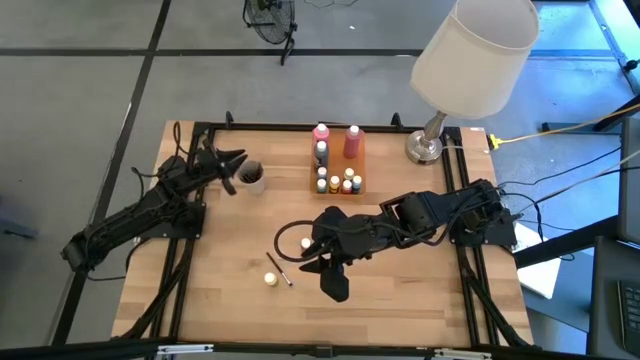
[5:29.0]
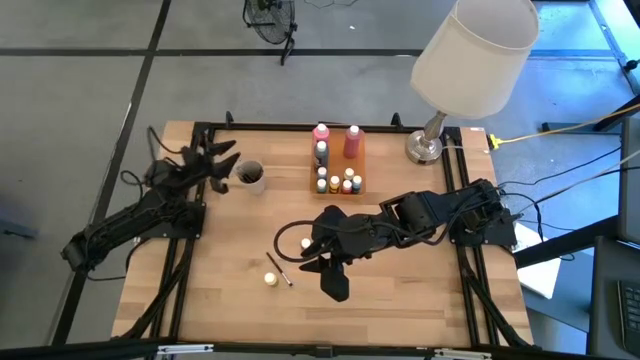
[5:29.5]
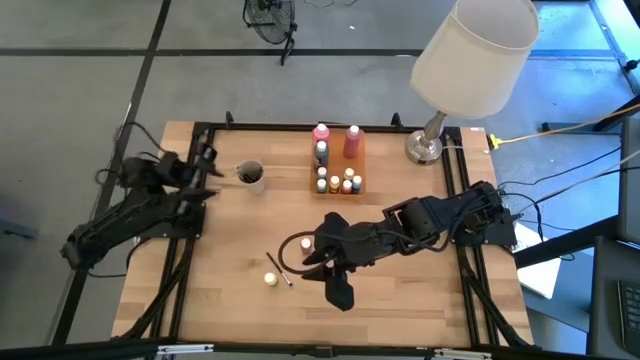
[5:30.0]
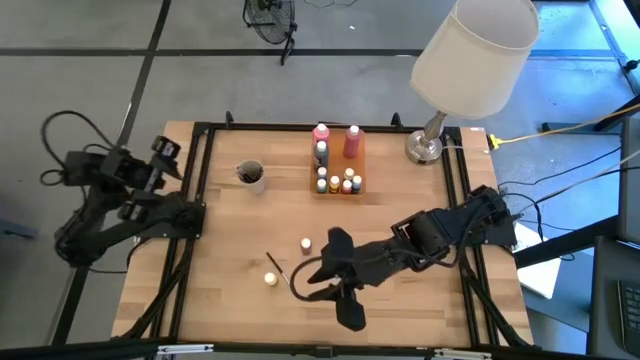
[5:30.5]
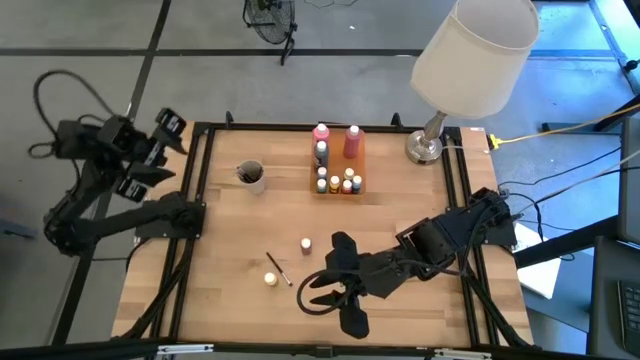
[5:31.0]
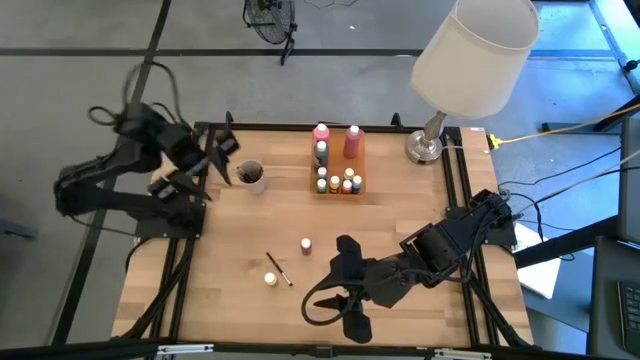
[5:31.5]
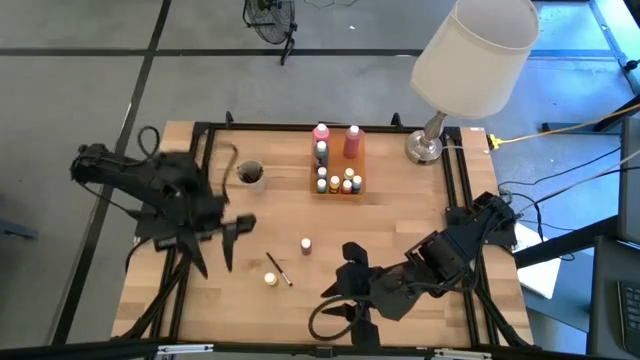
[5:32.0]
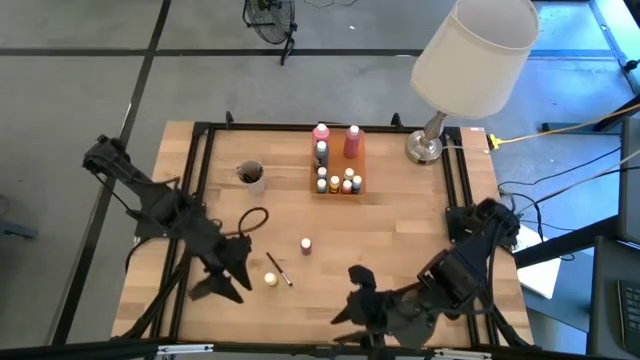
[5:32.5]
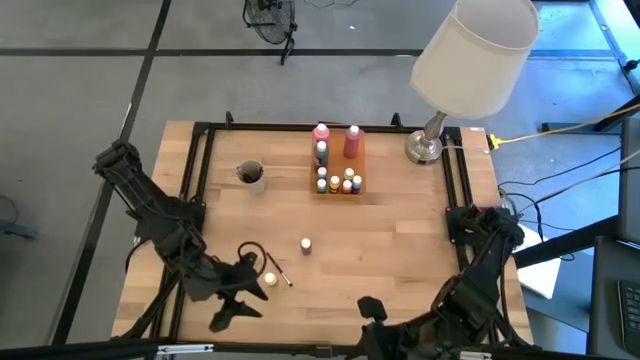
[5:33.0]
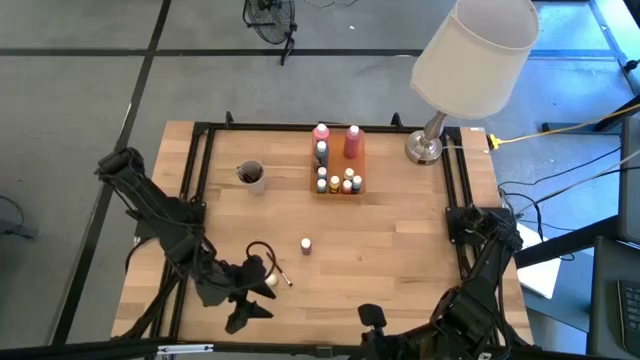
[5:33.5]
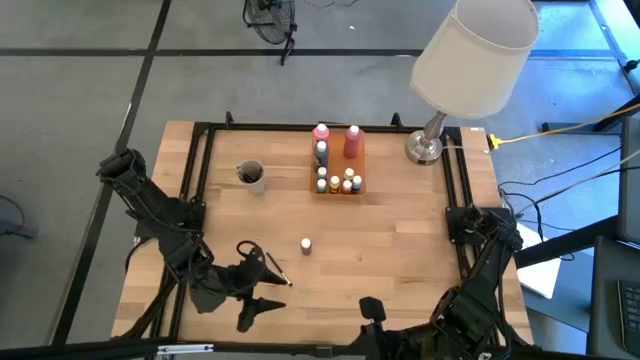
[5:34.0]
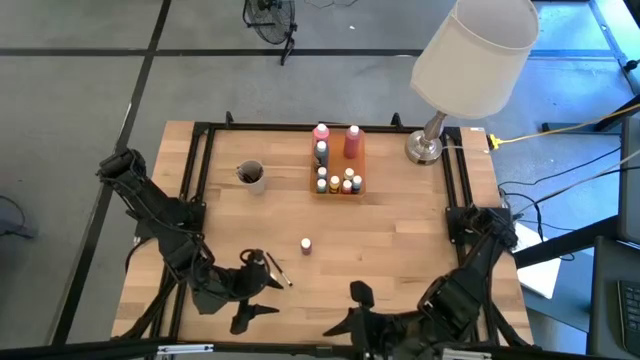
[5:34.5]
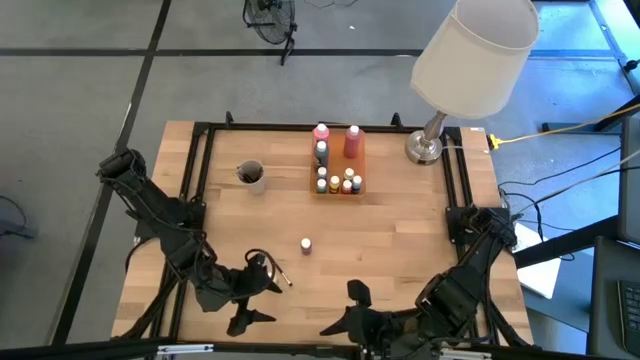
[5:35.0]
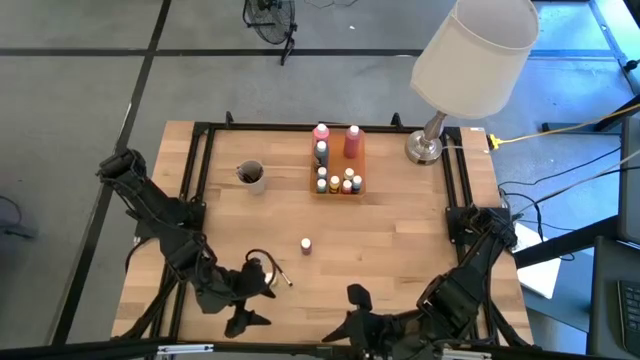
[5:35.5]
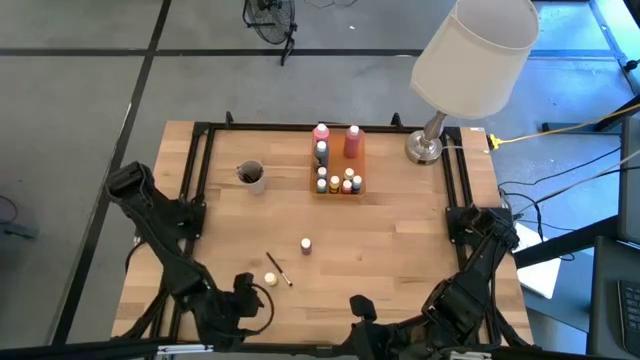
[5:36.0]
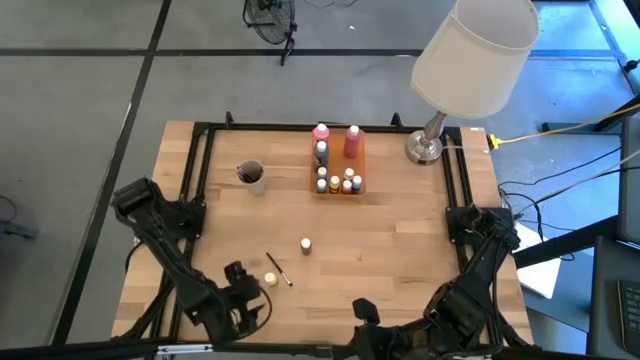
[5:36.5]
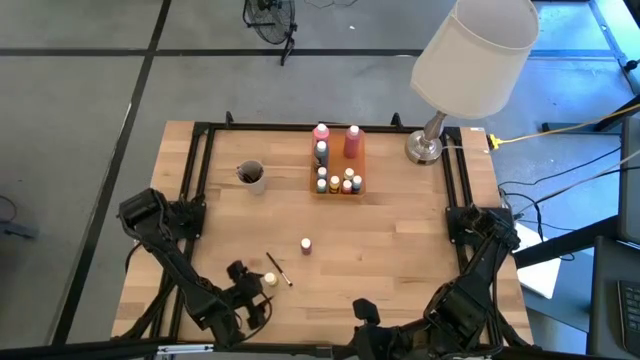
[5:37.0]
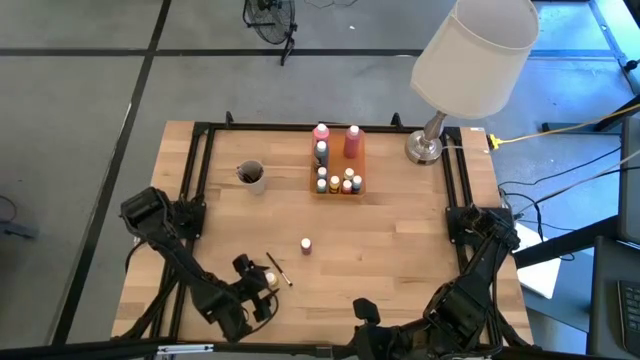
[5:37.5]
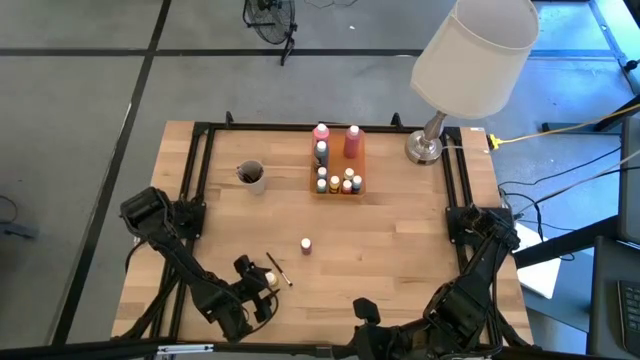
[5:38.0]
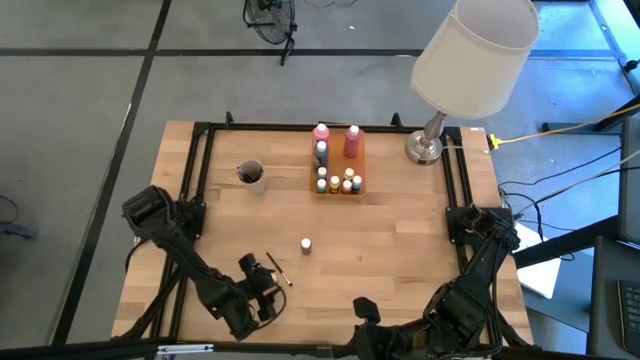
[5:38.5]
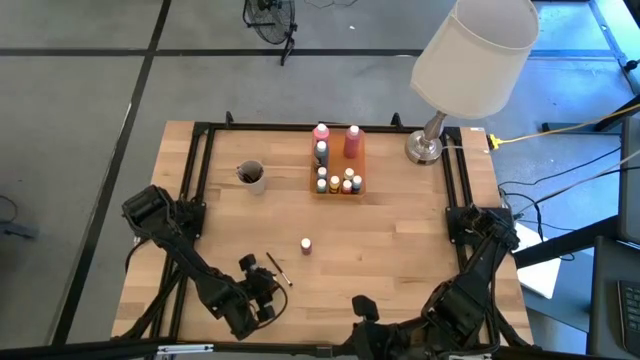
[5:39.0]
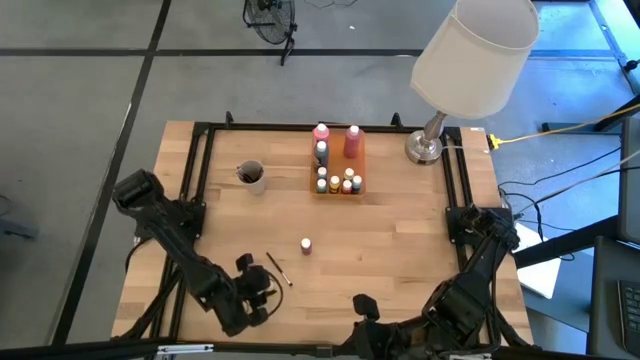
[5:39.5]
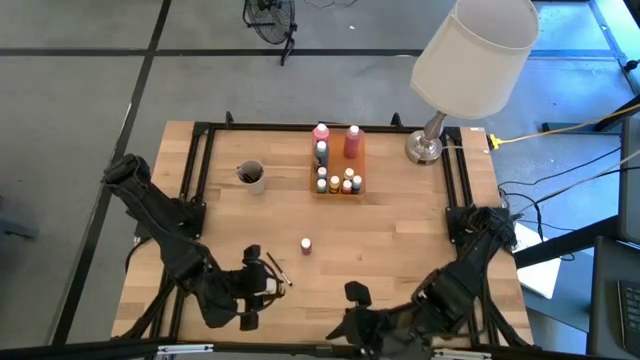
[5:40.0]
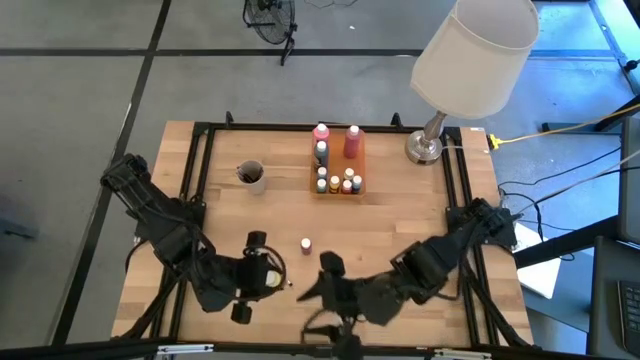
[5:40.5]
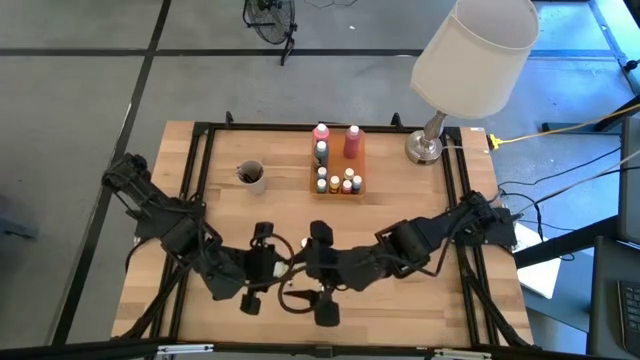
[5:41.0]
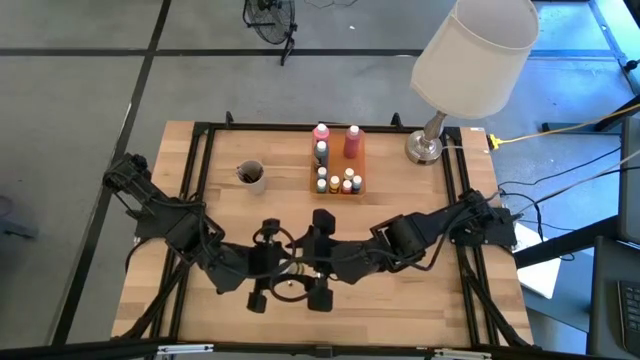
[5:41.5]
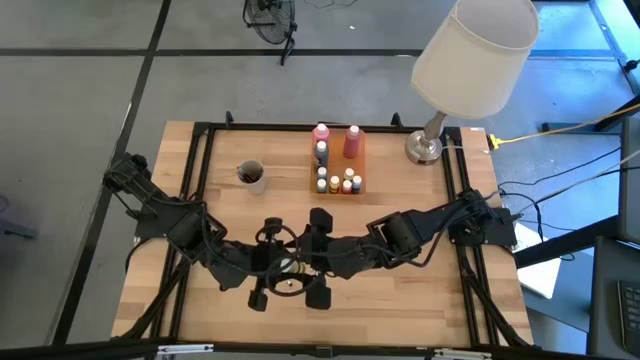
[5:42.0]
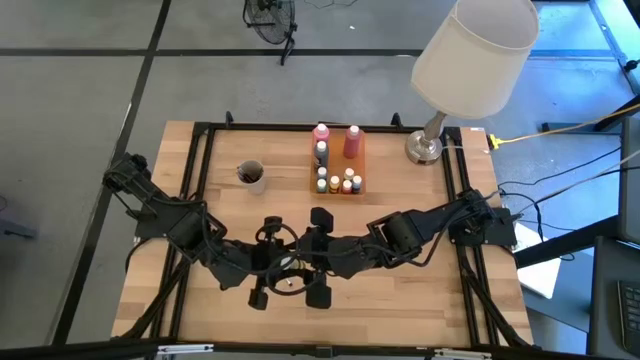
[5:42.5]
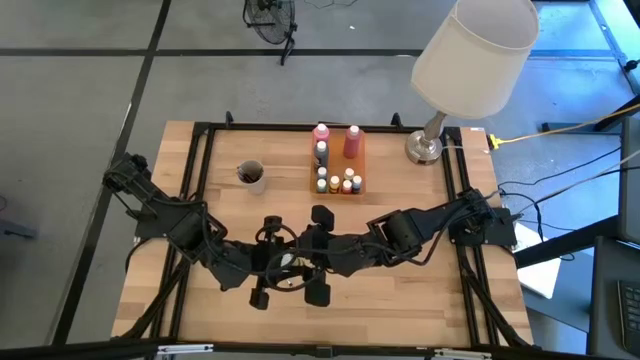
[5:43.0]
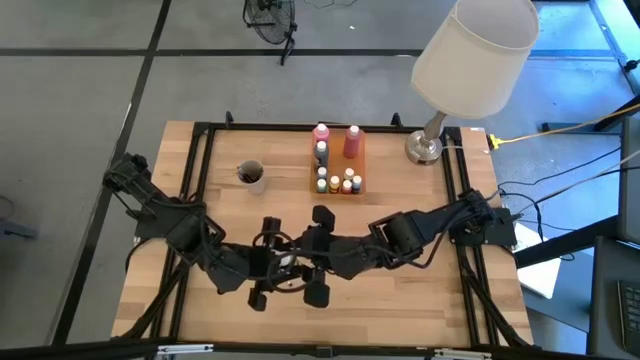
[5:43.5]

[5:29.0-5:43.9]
Task: Pick & Place Paint Supplies
Put the small light yellow paint bottle into the orange bin

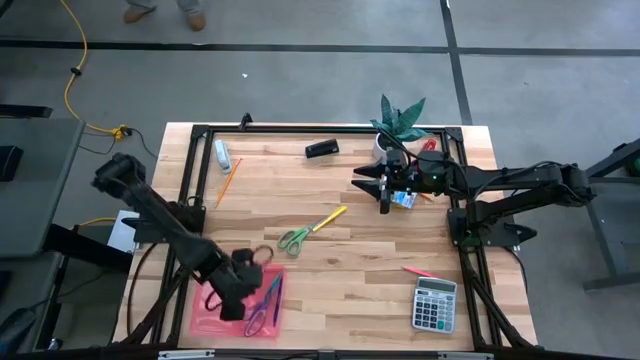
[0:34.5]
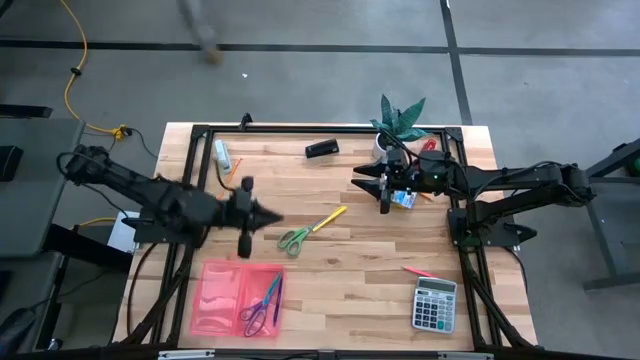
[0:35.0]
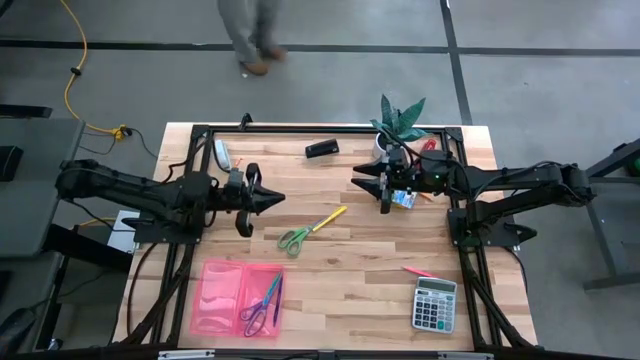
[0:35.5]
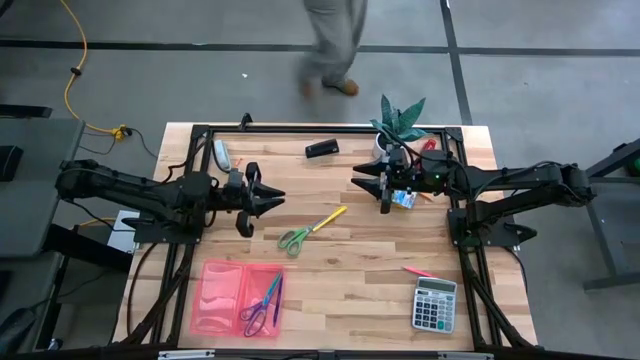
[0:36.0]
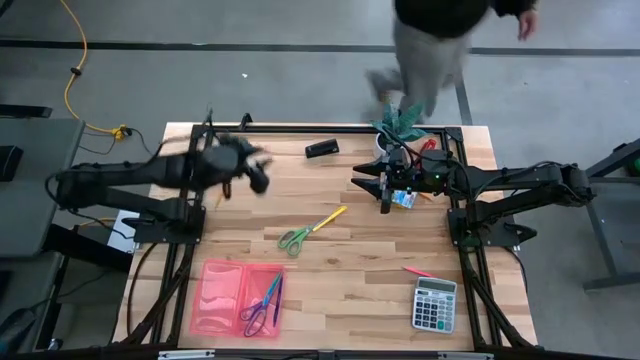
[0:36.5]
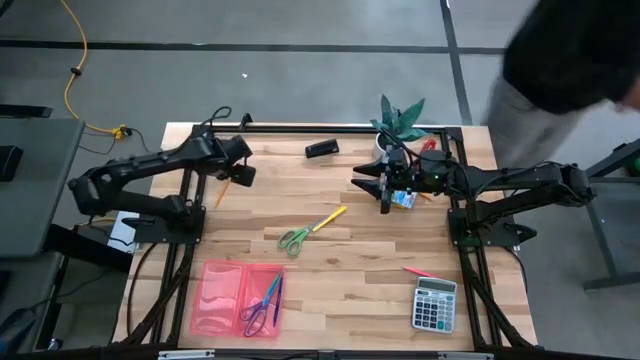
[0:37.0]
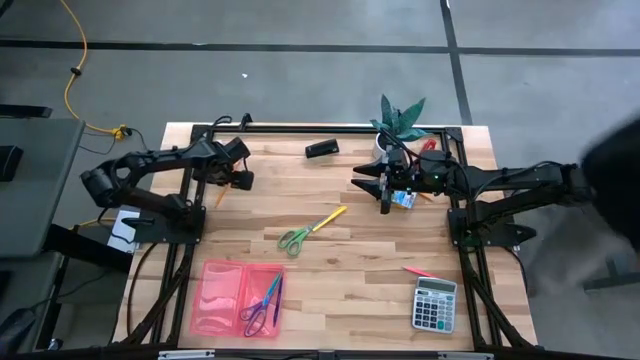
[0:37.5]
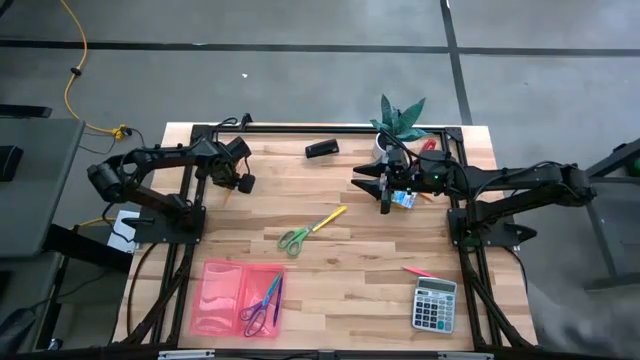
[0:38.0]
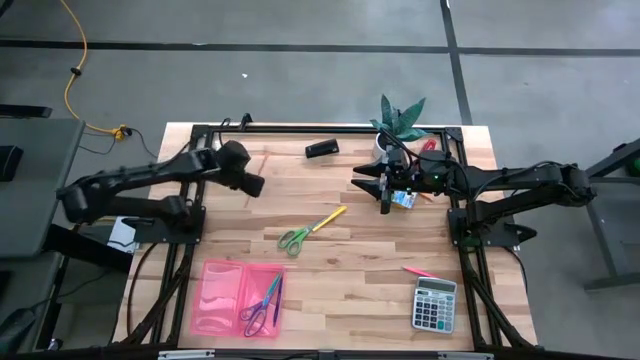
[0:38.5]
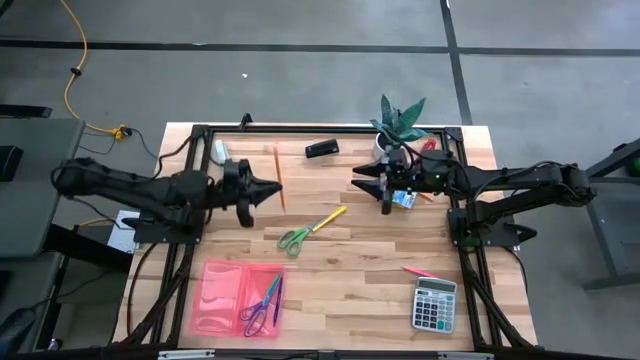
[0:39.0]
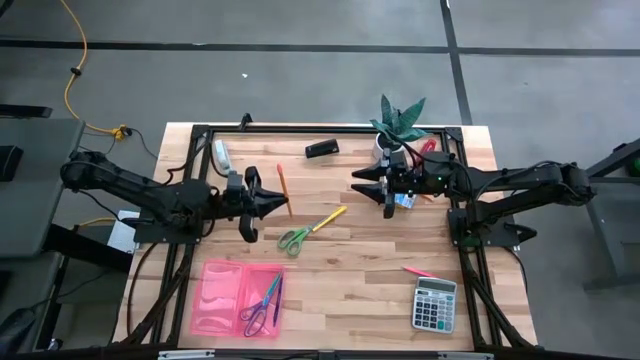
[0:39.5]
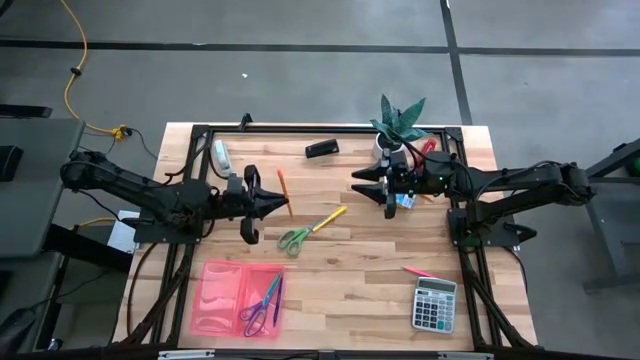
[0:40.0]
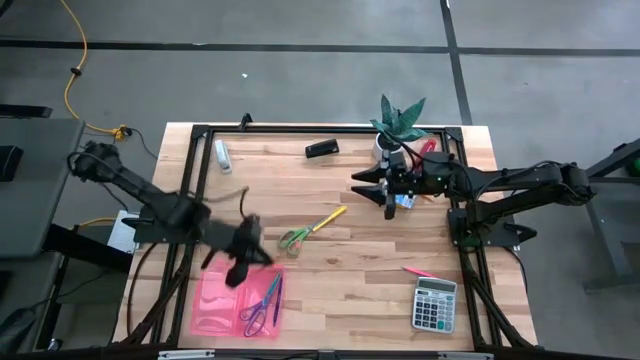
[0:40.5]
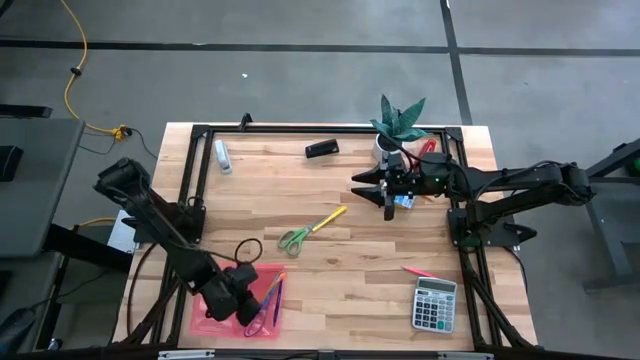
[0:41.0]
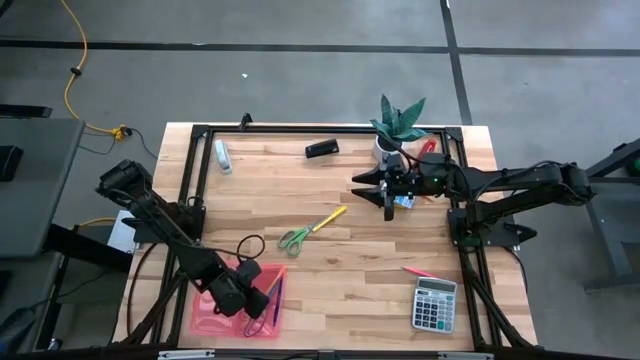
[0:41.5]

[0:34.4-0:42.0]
Task: Pack school essentials
Put the left orange pencil into the supply box
